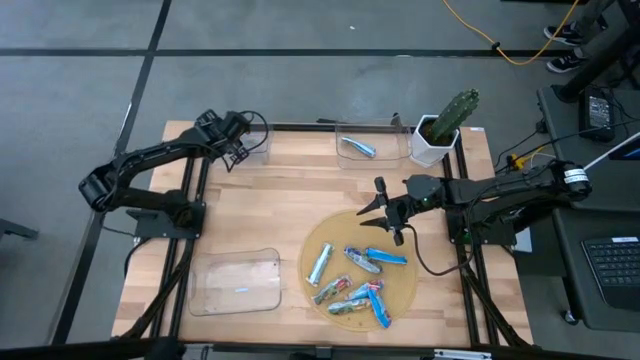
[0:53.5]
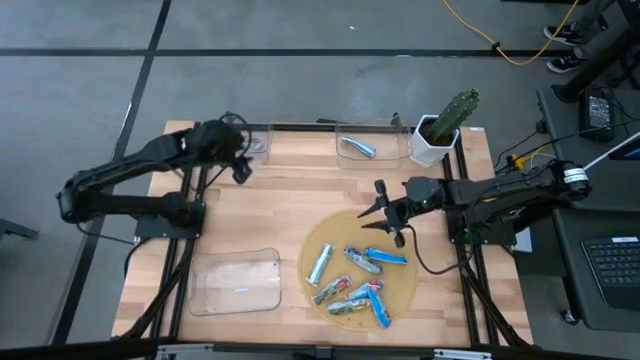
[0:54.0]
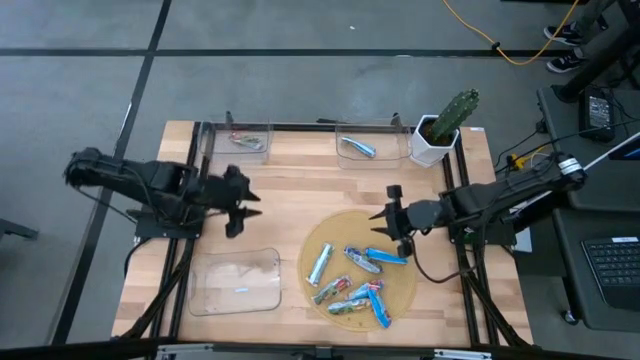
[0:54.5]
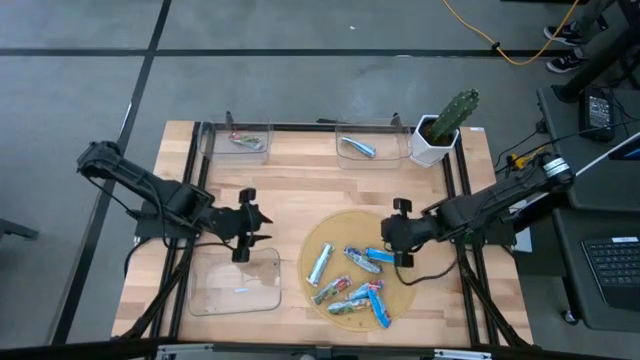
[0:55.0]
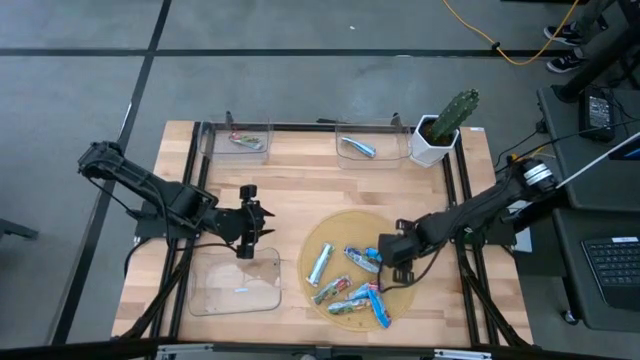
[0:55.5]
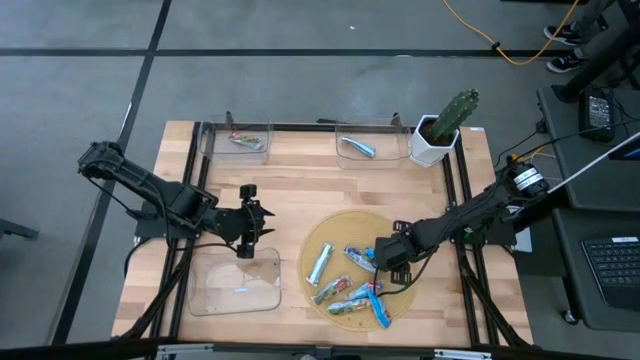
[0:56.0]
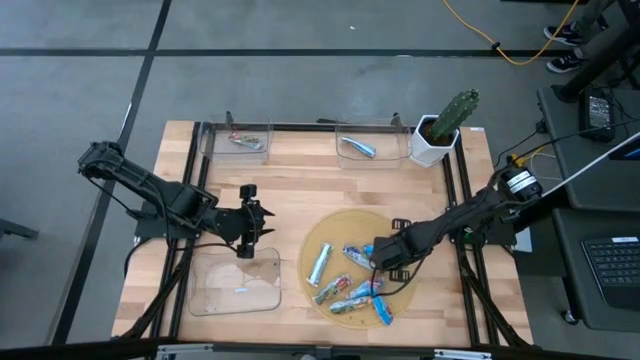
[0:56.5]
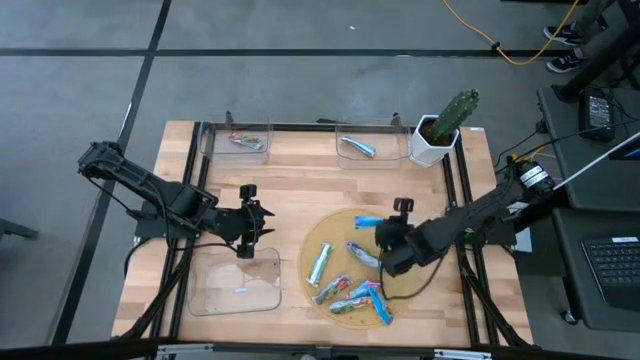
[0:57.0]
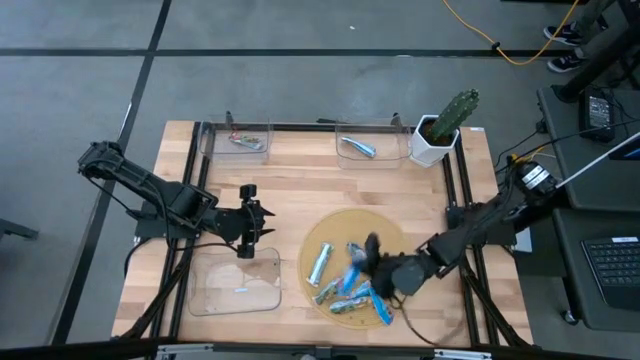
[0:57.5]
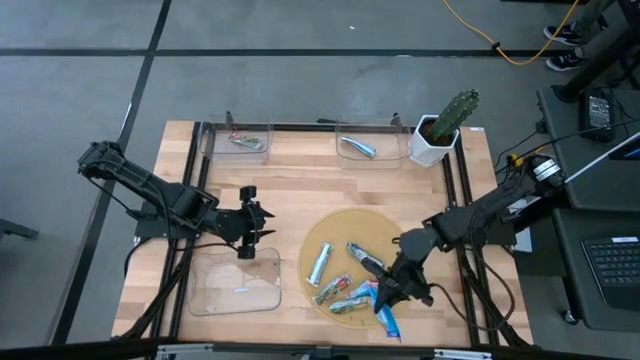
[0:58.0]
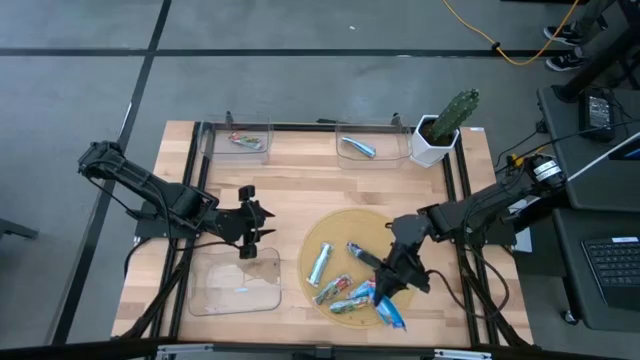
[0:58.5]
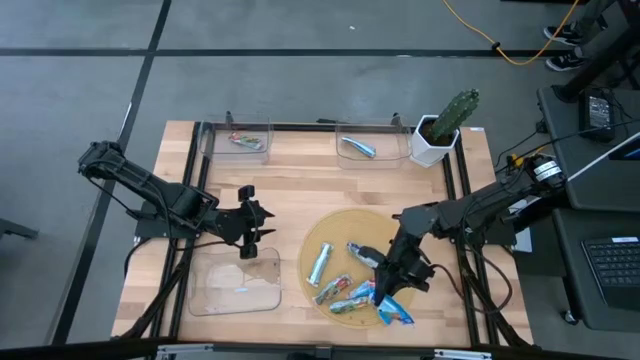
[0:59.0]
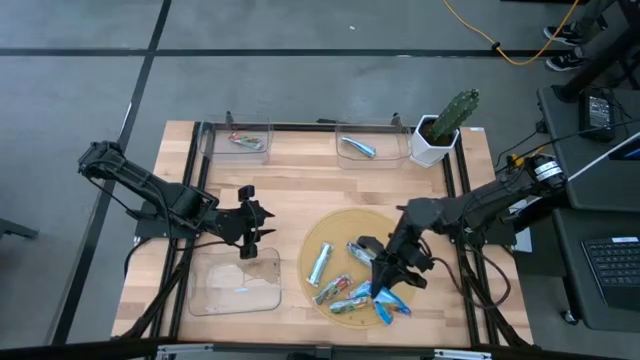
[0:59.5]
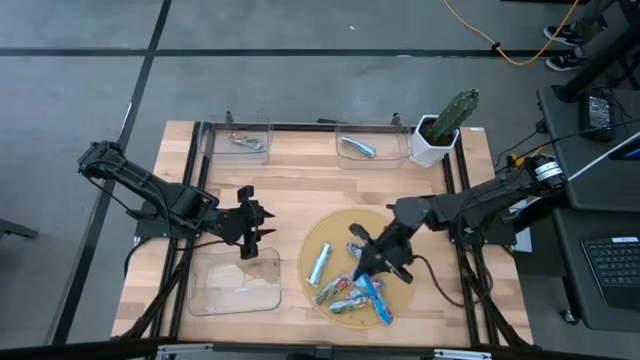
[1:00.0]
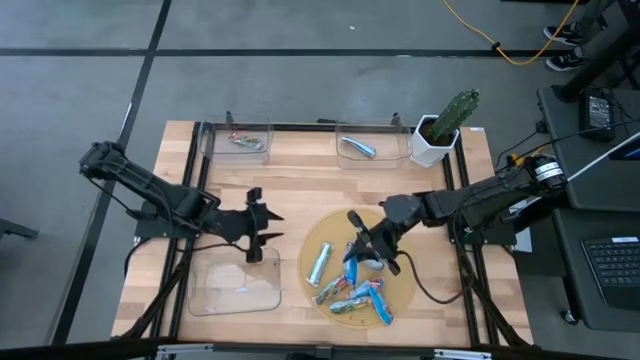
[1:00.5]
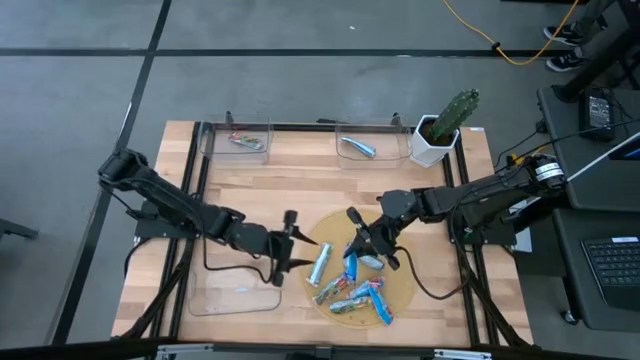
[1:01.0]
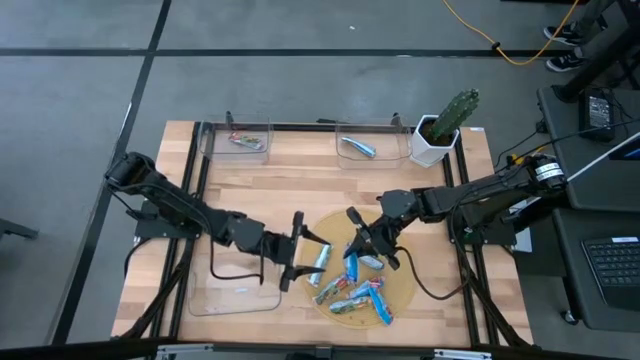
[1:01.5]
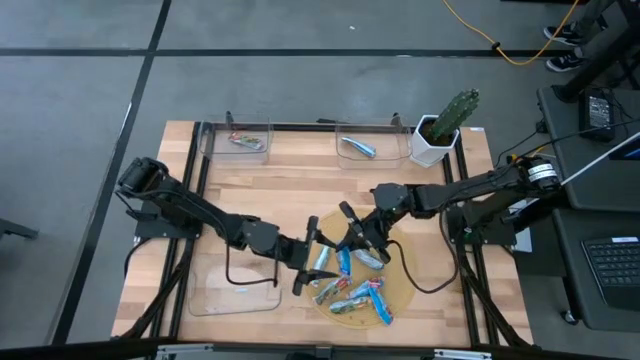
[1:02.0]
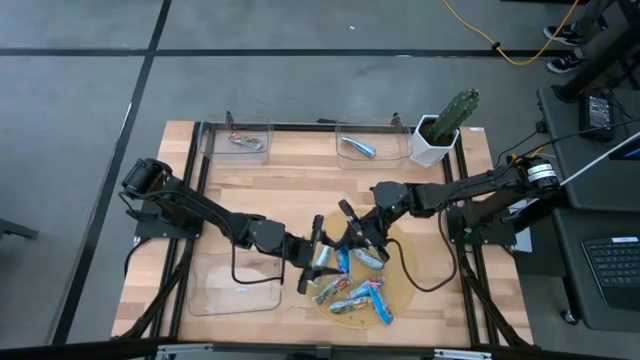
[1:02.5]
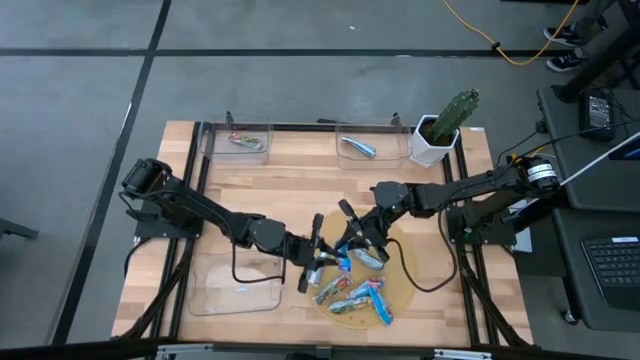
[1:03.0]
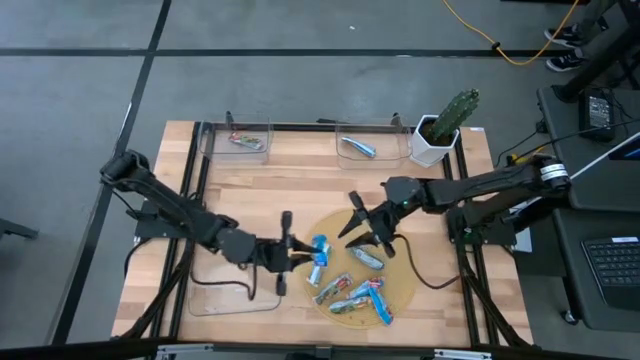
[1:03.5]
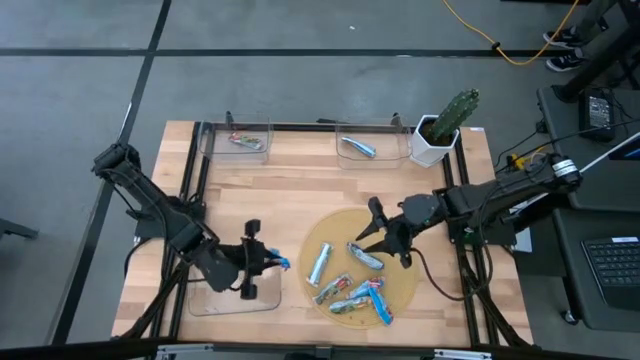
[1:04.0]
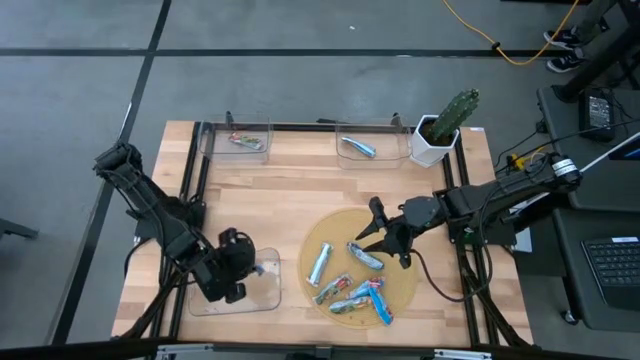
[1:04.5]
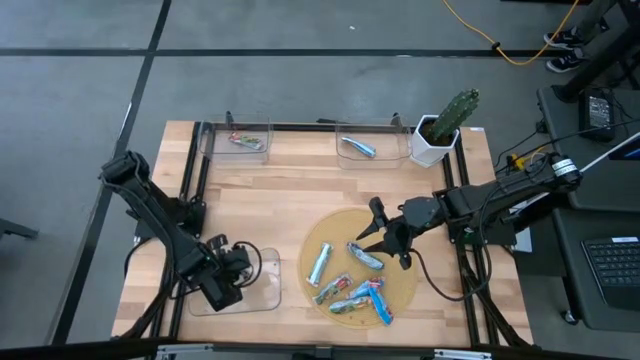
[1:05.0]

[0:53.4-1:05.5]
Task: Pick and place Granola Bars by type
Put the blue granola bar into the bottom transparent bin

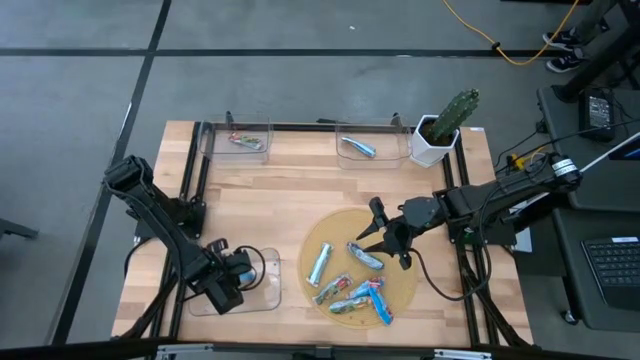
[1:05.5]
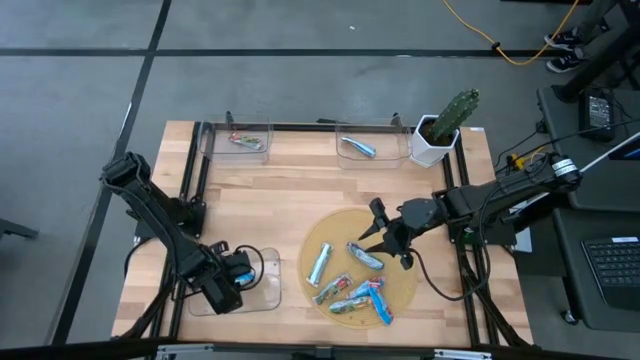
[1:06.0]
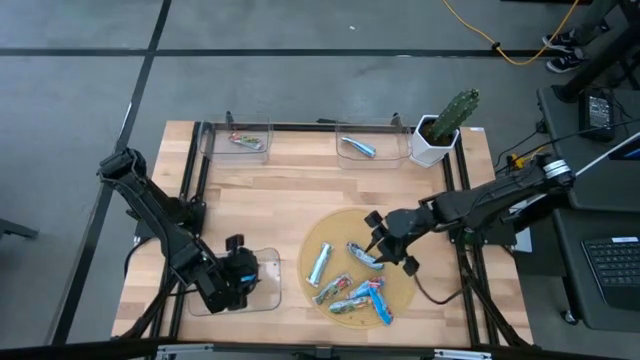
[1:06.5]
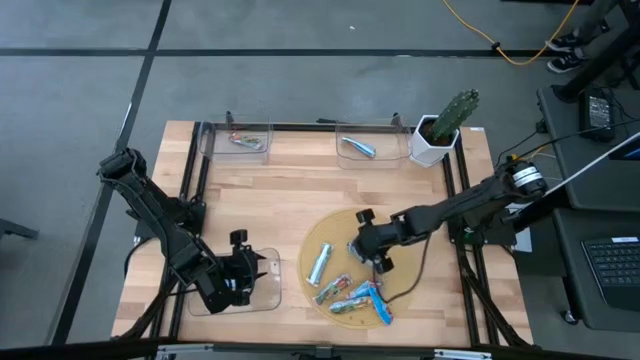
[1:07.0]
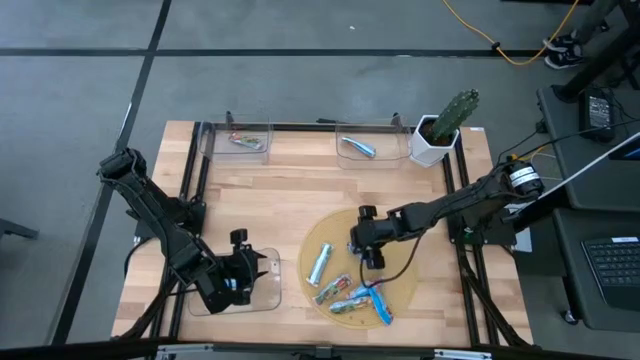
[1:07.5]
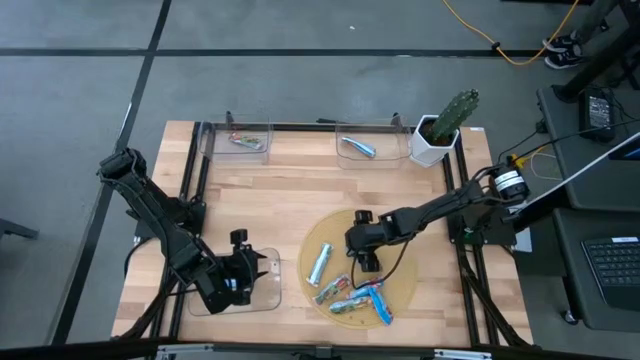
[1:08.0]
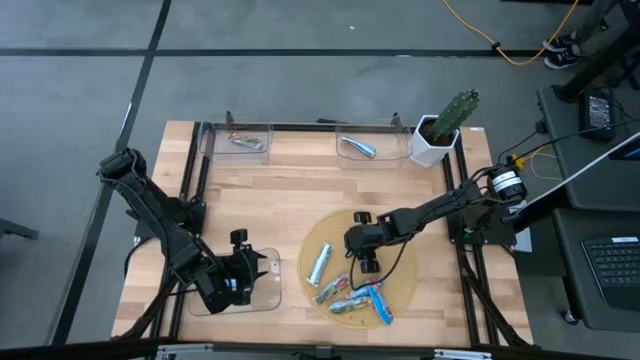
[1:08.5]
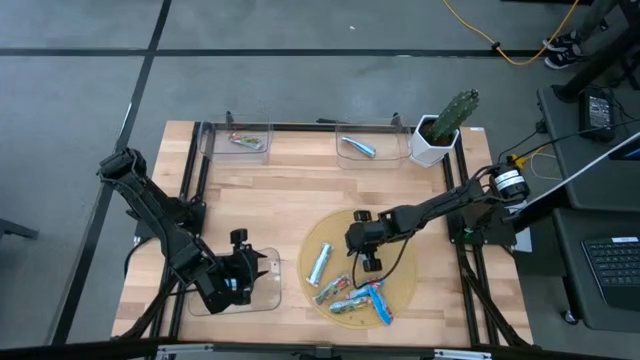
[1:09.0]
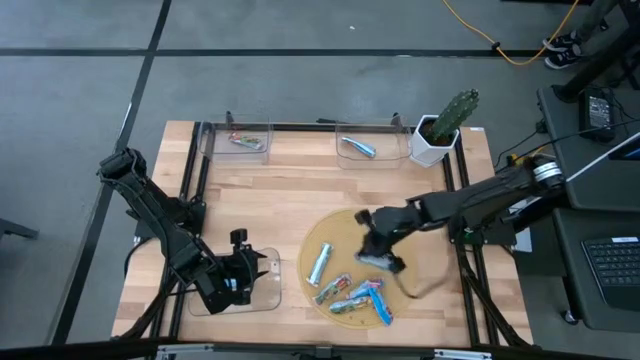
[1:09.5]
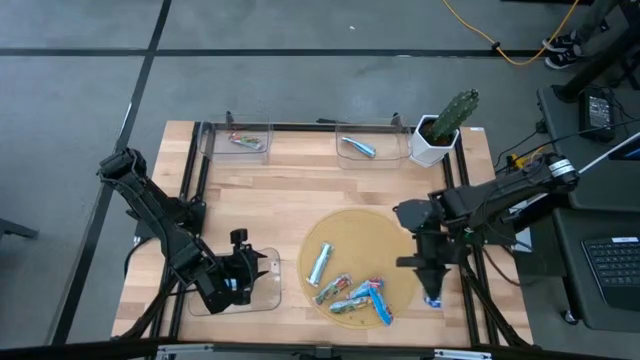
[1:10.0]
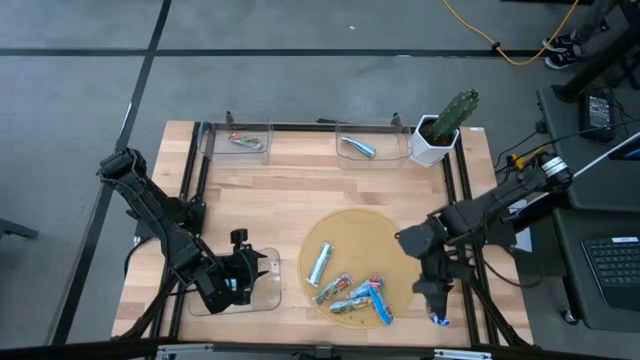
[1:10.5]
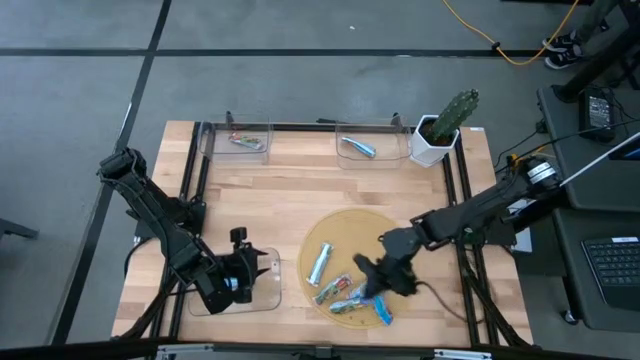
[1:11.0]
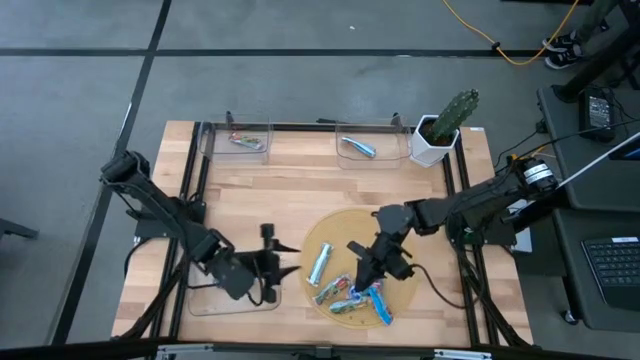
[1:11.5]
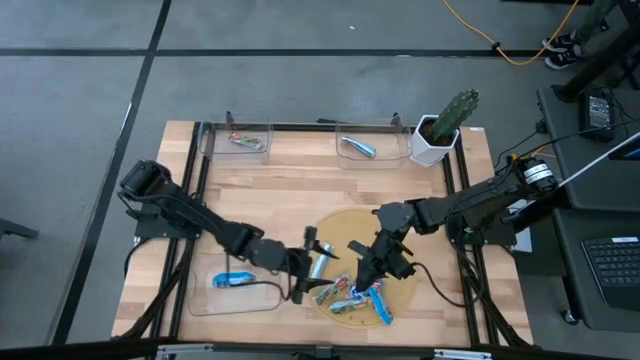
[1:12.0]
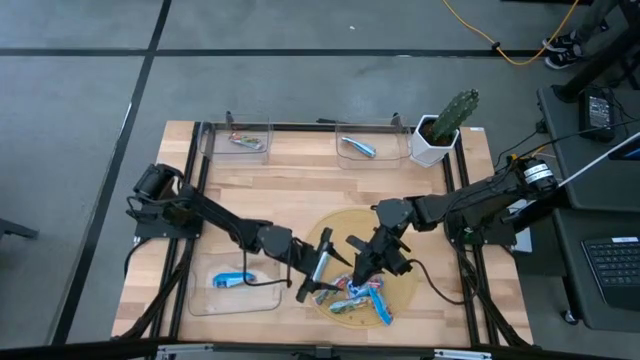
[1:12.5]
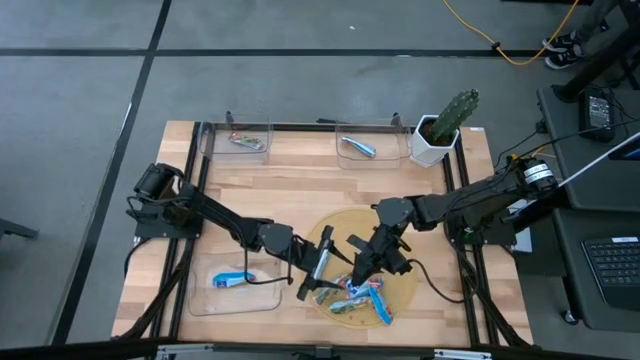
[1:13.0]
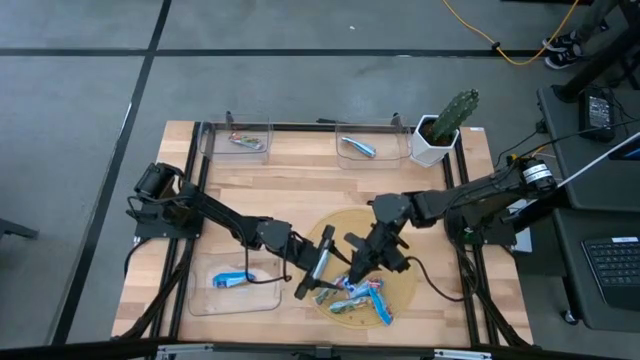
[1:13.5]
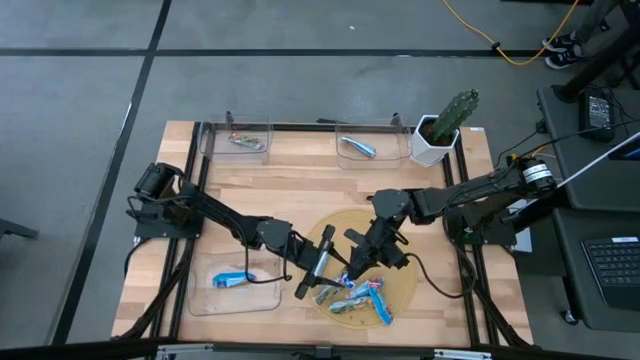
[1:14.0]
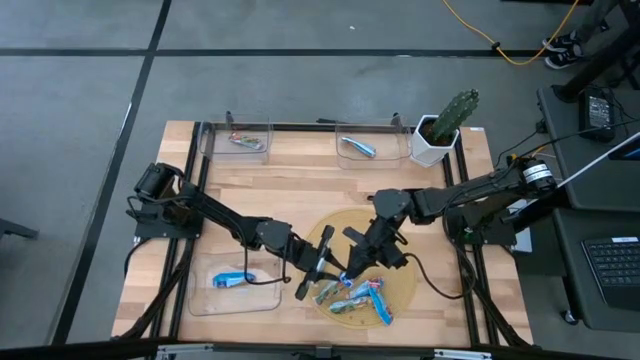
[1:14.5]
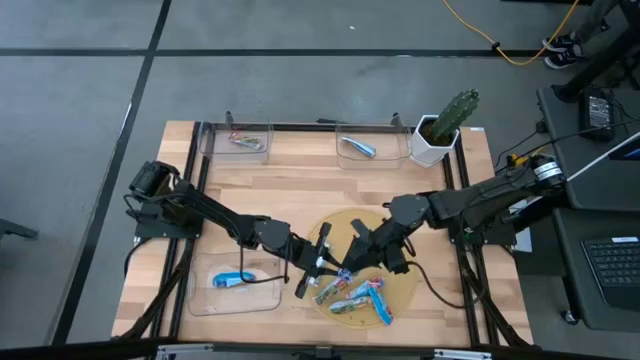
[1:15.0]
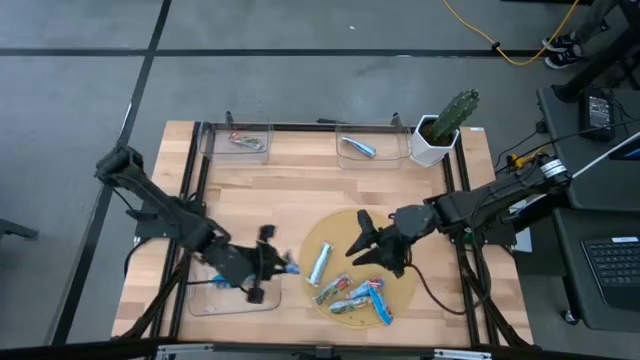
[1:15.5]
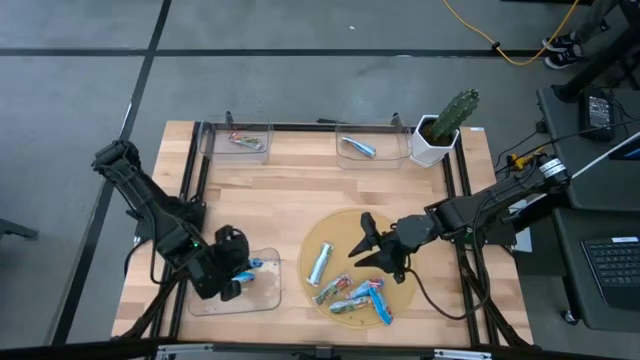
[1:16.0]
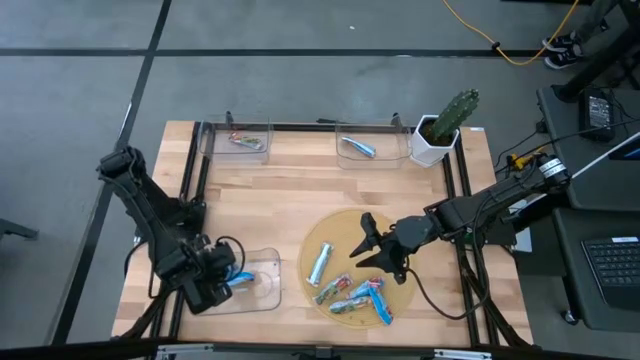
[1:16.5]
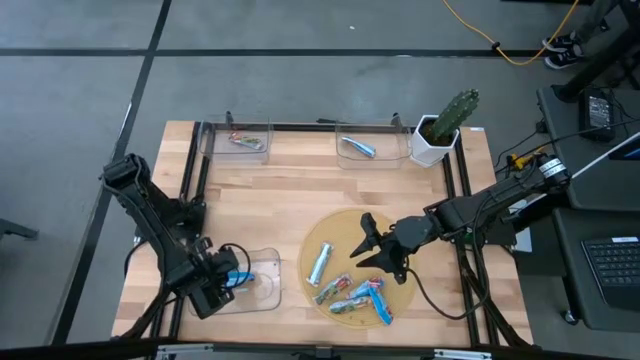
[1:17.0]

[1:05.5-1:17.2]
Put the blue granola bar into the bottom transparent bin
